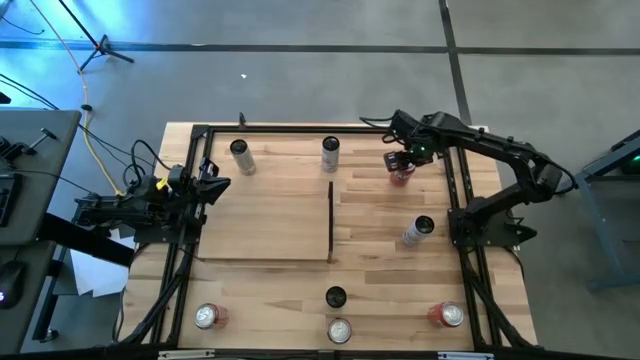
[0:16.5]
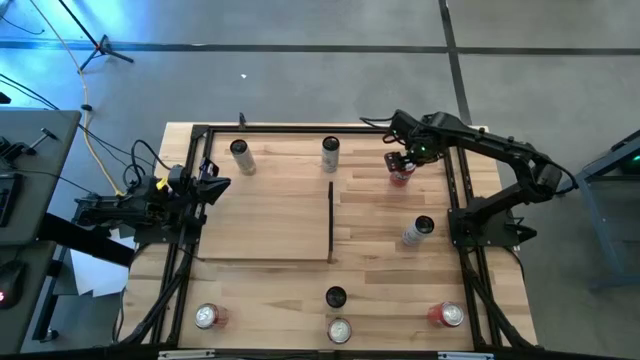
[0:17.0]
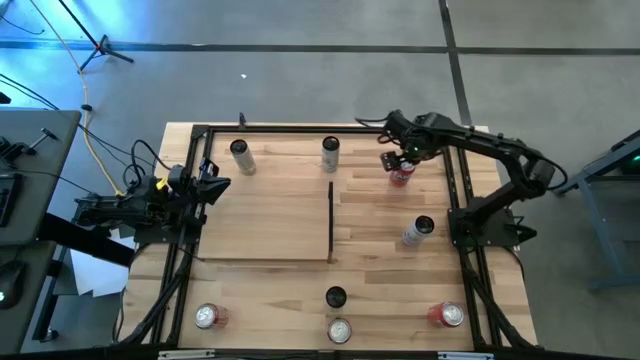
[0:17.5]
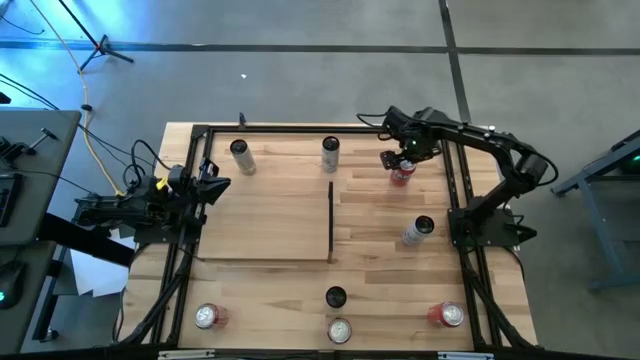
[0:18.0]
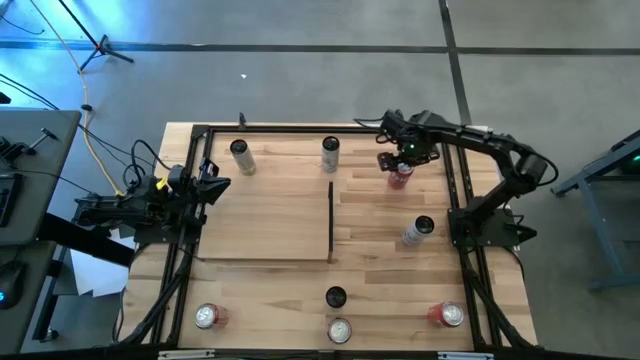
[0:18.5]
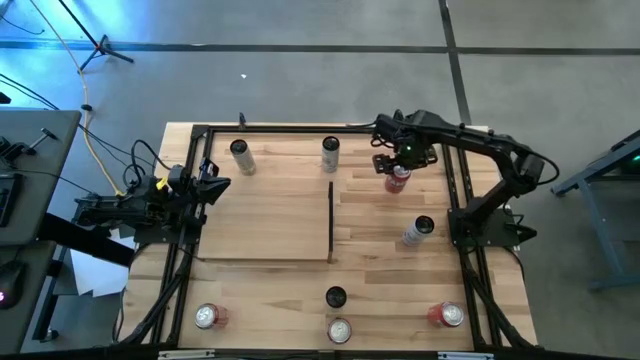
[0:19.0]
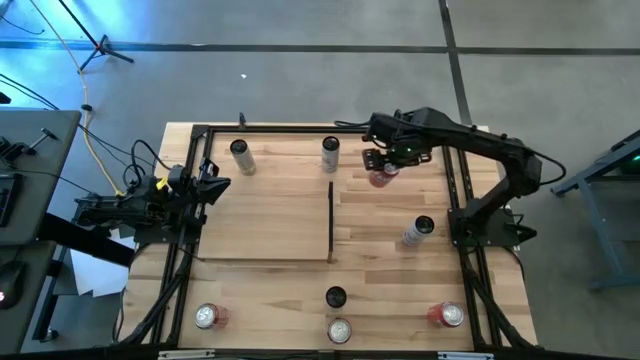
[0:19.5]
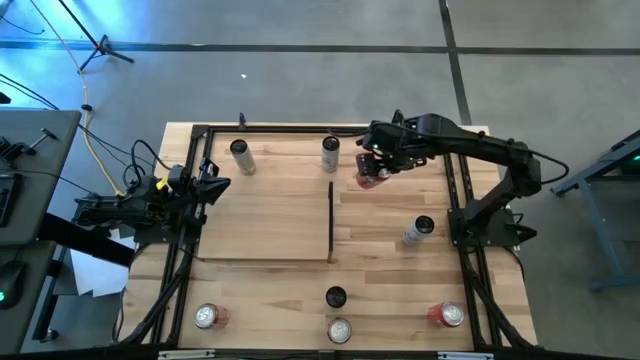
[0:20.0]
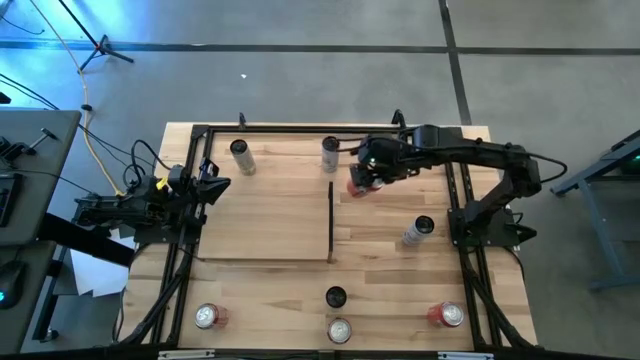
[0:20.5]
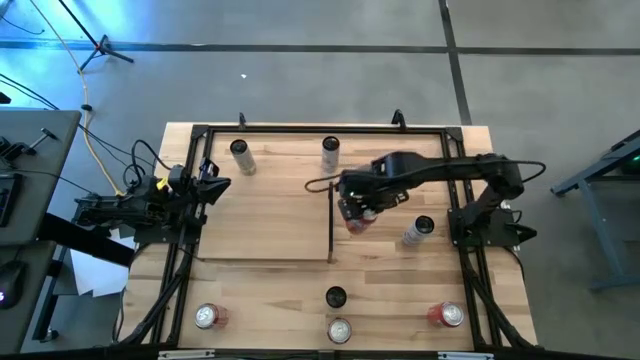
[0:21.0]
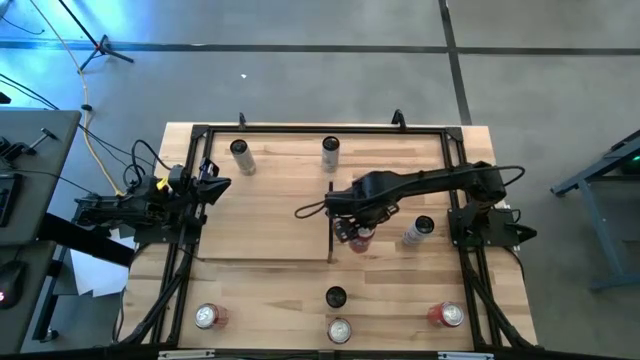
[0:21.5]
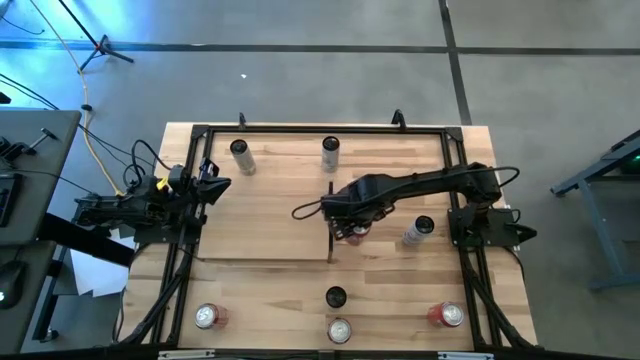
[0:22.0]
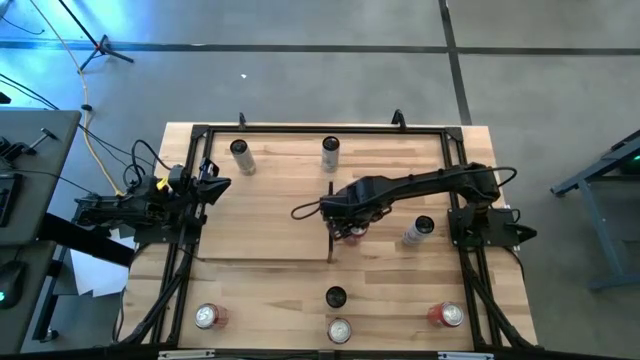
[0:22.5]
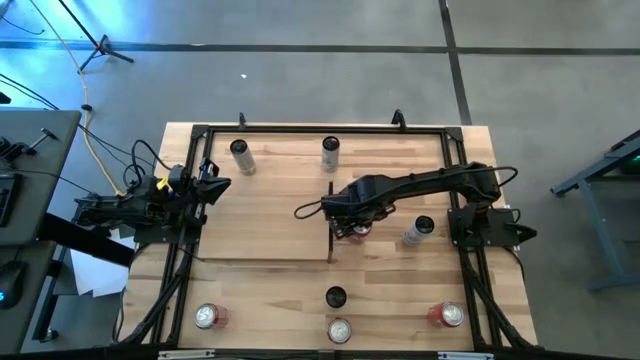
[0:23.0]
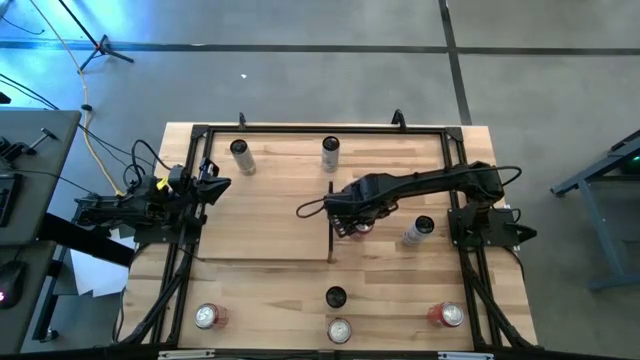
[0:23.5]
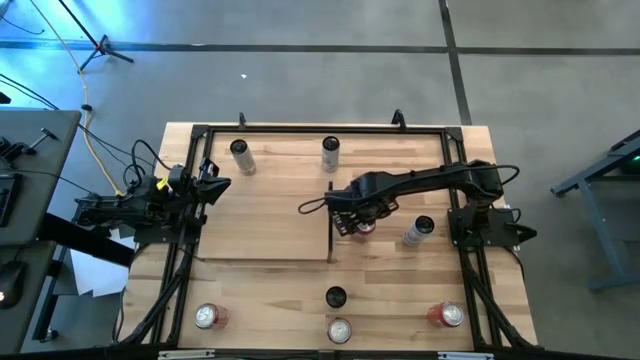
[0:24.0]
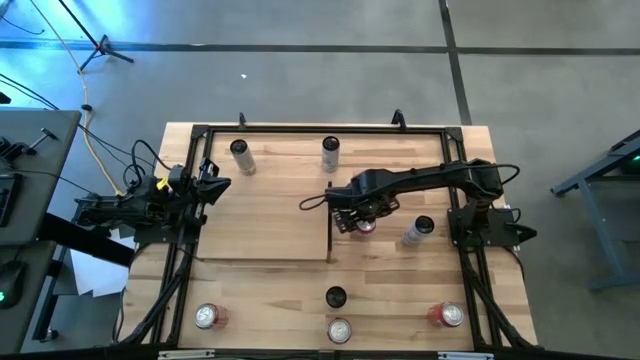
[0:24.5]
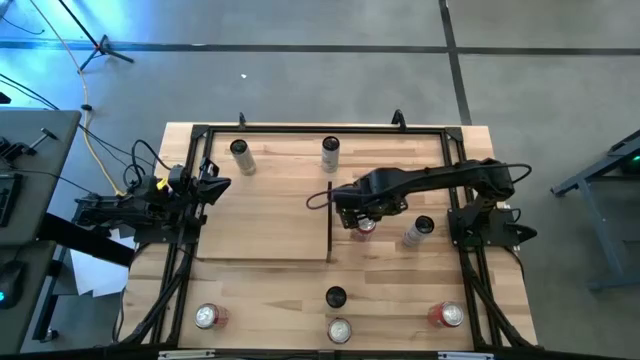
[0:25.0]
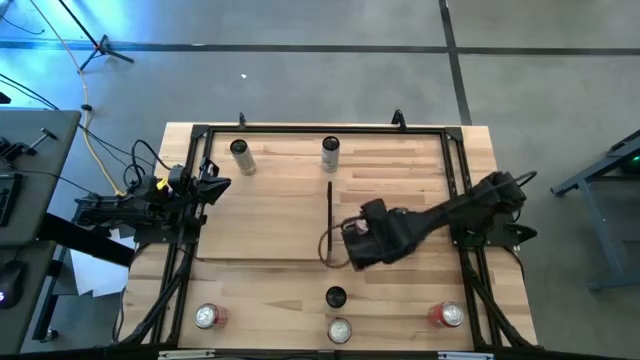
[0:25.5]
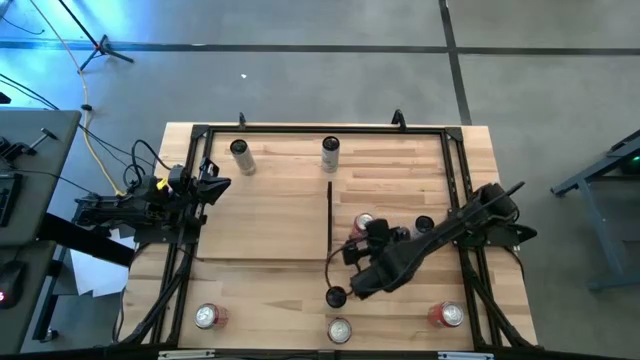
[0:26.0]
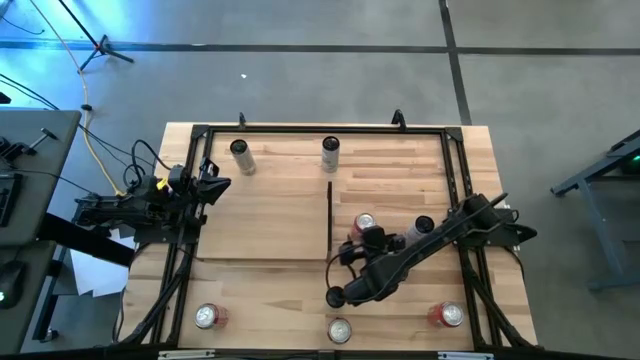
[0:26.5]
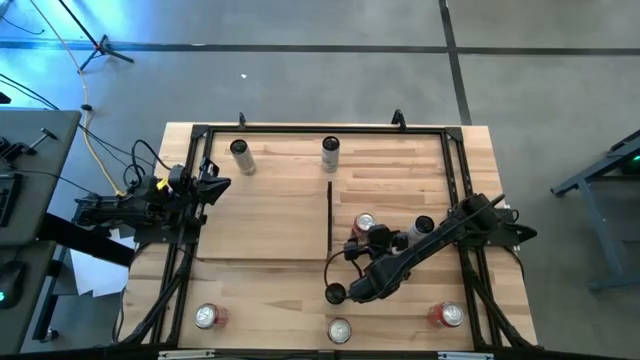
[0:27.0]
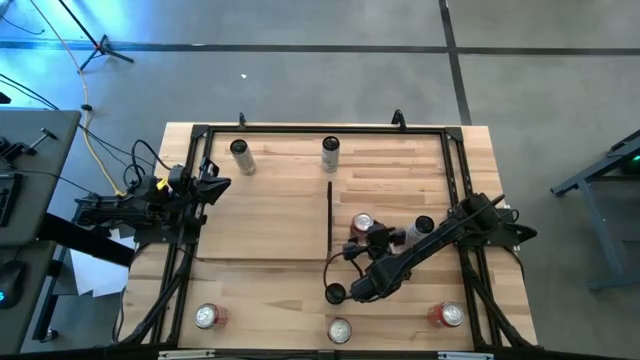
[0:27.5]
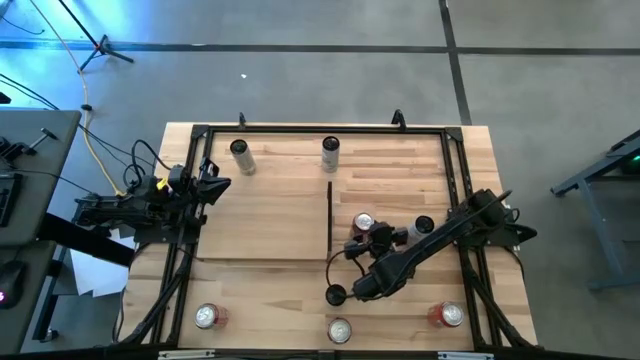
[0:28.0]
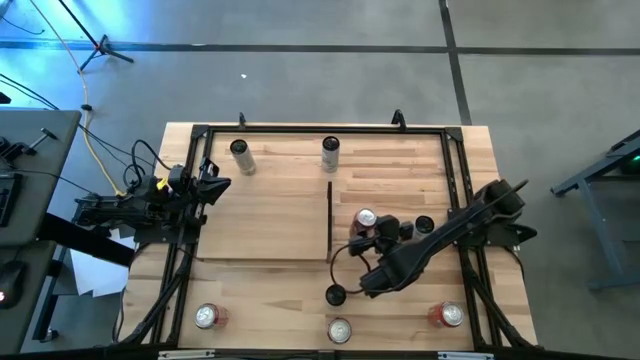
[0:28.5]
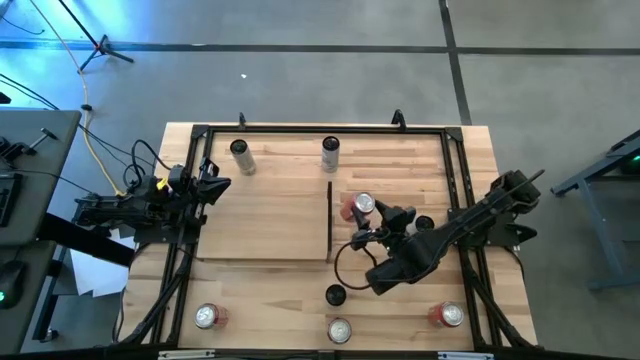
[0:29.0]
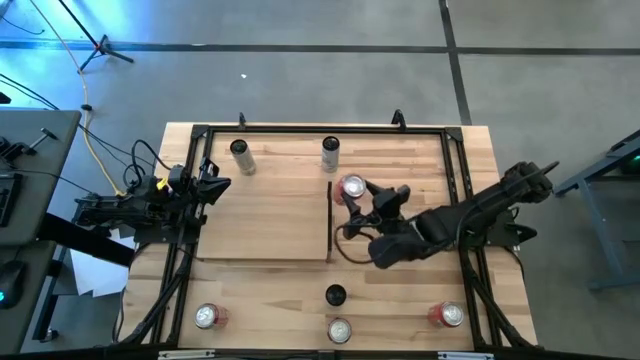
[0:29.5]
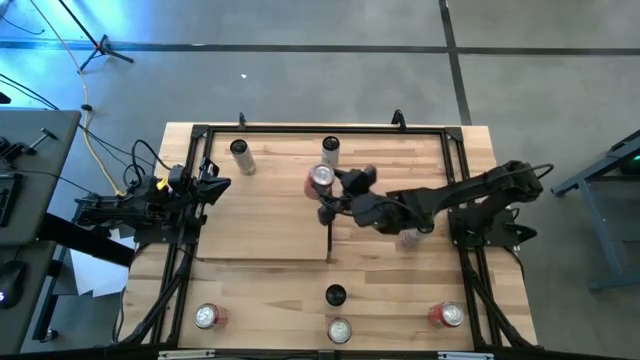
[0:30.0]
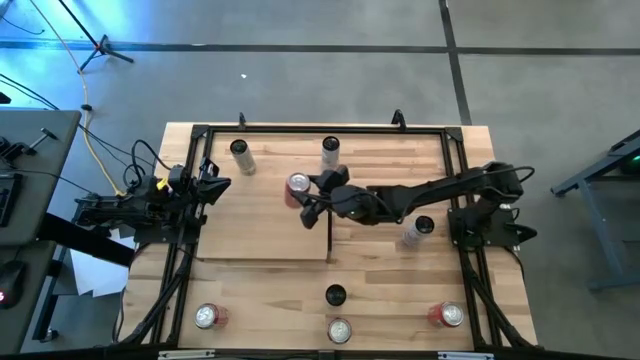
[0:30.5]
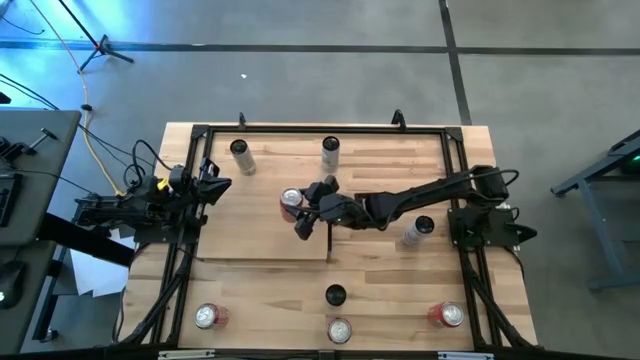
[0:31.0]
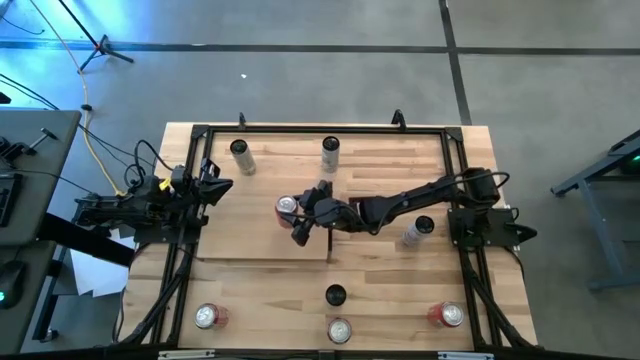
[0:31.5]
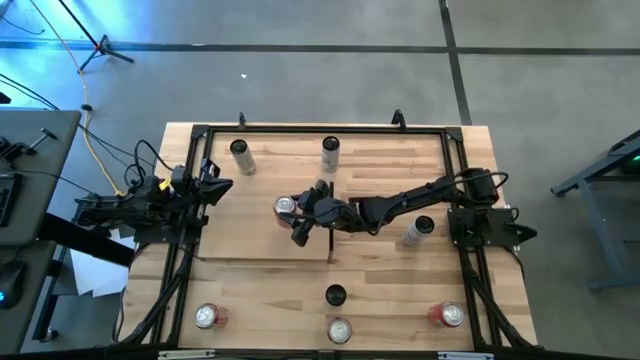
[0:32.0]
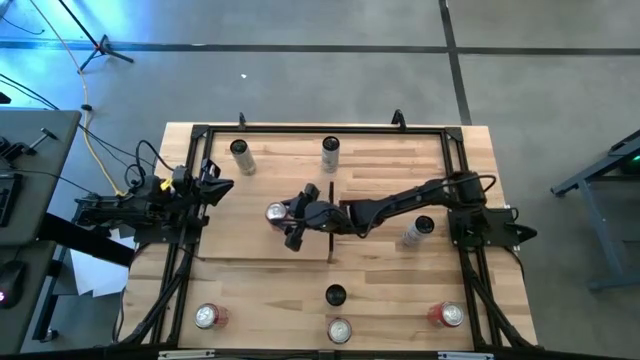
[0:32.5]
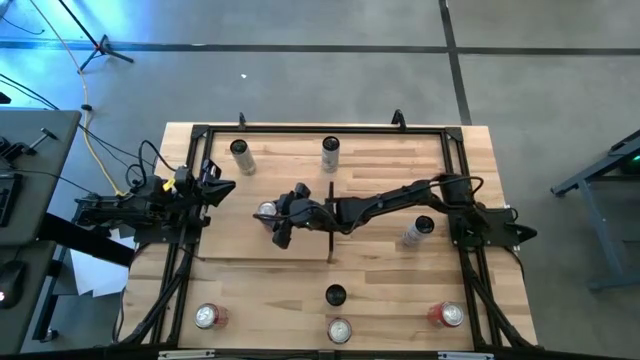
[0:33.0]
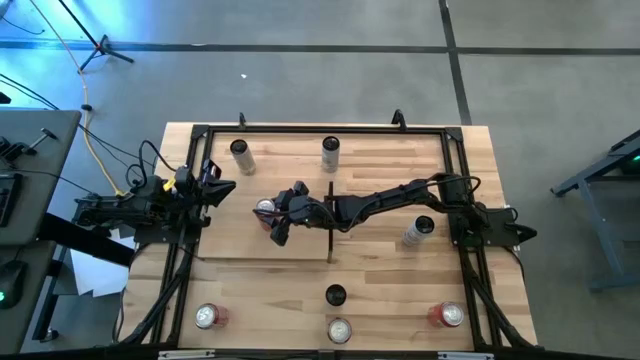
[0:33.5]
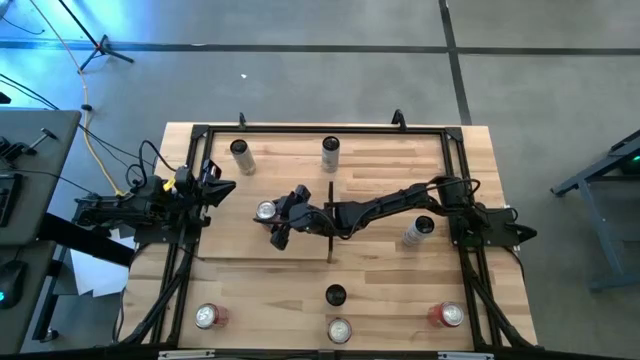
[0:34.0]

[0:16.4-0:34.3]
Task: Place canned beverage on shelf
Put the top red soda can on the shelf
